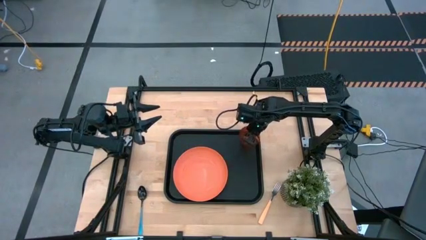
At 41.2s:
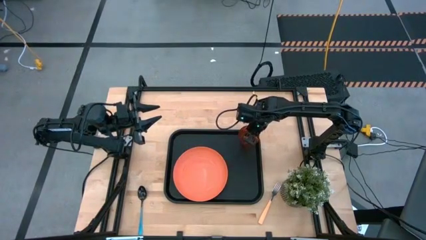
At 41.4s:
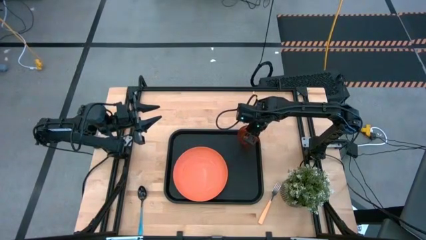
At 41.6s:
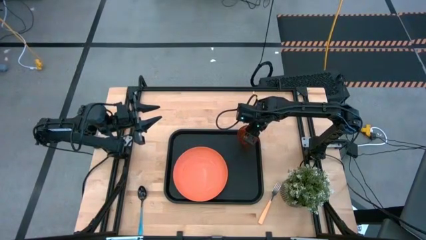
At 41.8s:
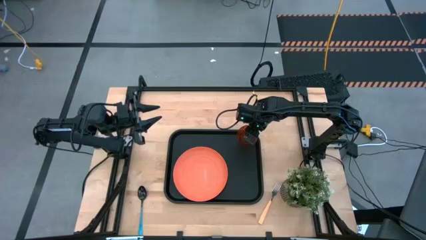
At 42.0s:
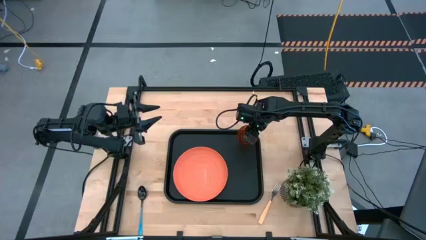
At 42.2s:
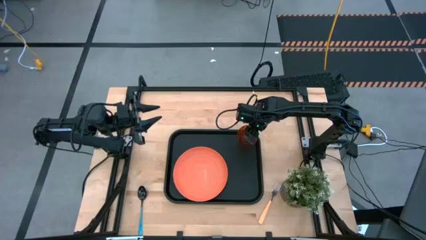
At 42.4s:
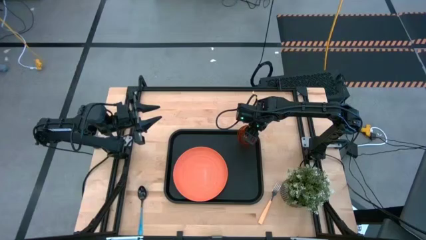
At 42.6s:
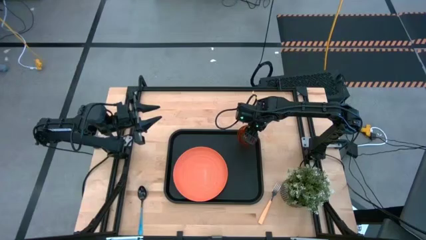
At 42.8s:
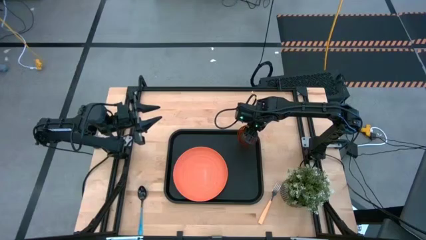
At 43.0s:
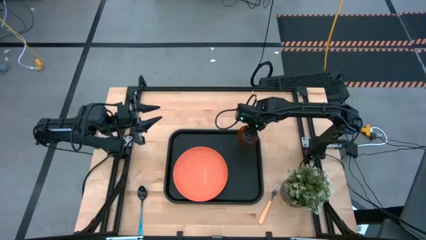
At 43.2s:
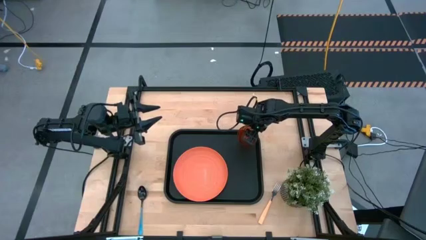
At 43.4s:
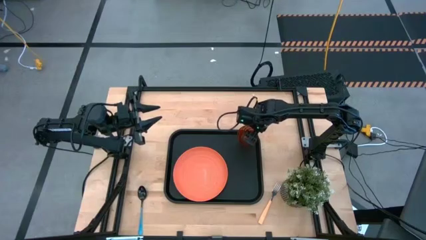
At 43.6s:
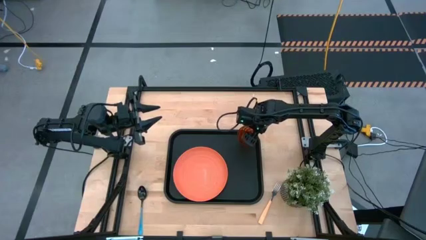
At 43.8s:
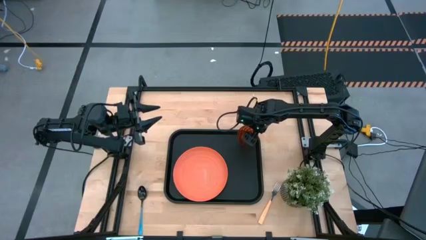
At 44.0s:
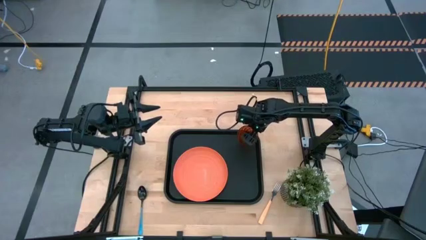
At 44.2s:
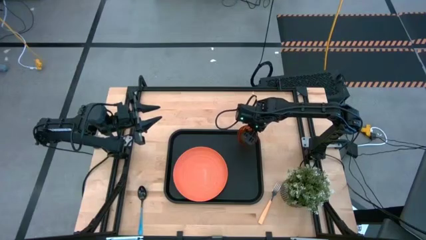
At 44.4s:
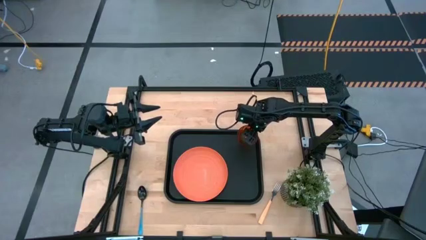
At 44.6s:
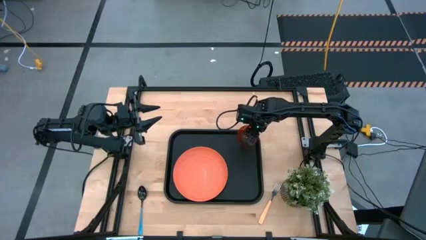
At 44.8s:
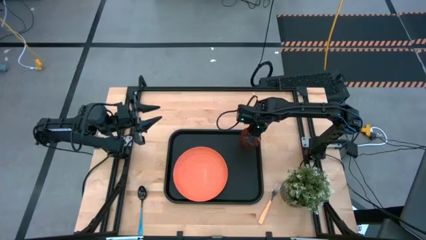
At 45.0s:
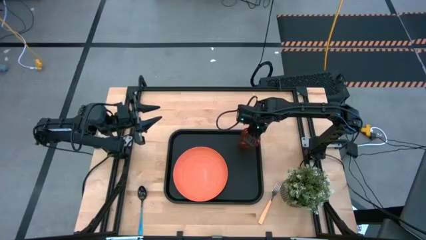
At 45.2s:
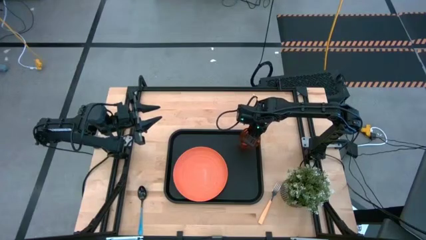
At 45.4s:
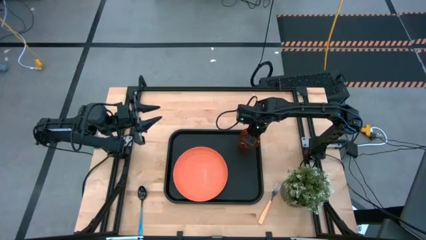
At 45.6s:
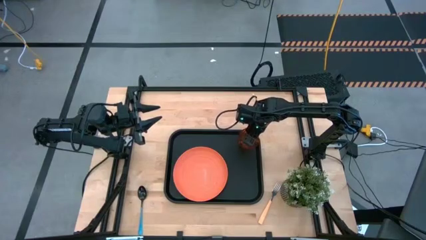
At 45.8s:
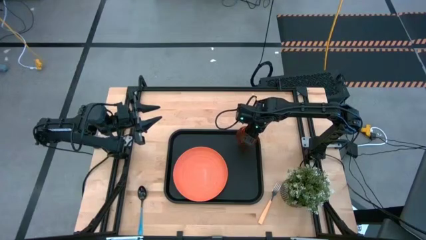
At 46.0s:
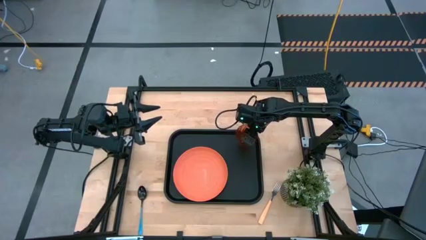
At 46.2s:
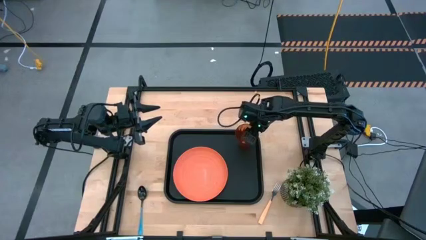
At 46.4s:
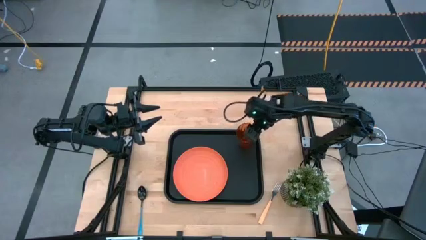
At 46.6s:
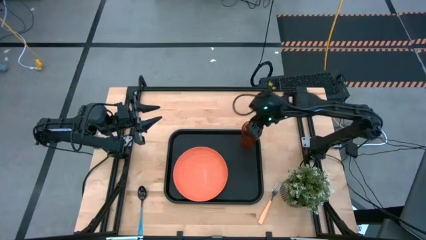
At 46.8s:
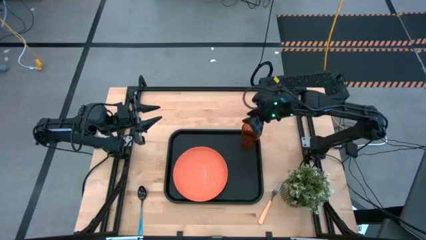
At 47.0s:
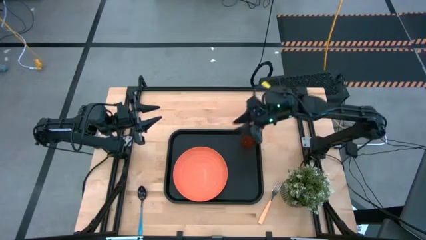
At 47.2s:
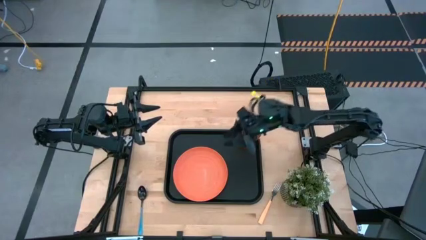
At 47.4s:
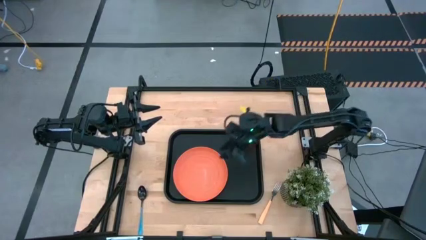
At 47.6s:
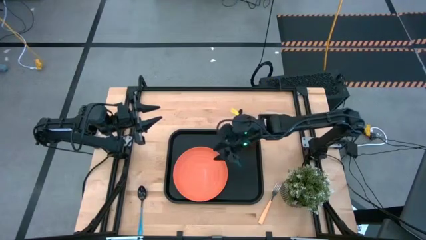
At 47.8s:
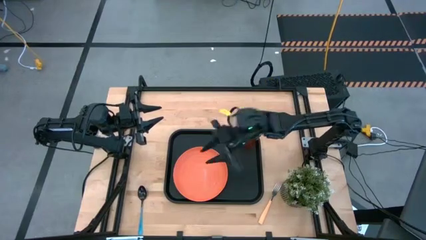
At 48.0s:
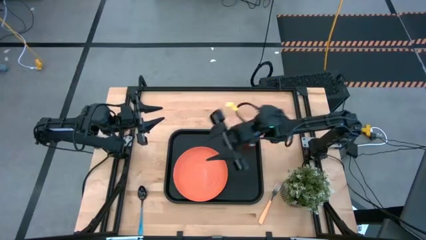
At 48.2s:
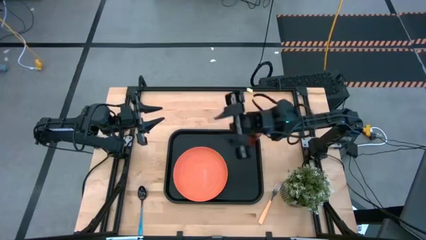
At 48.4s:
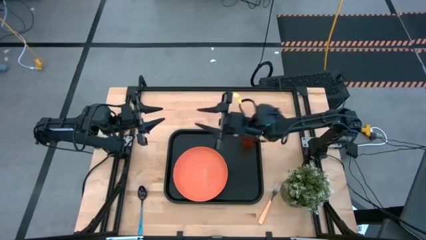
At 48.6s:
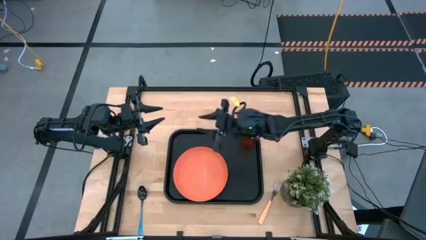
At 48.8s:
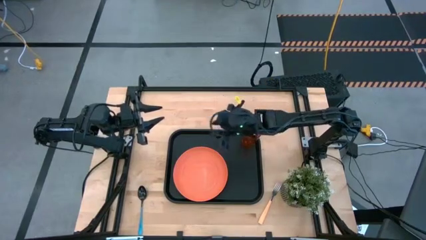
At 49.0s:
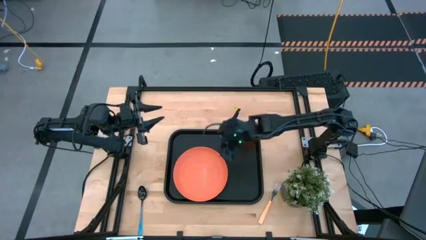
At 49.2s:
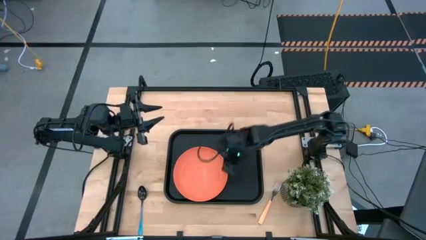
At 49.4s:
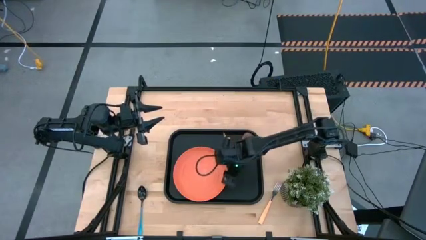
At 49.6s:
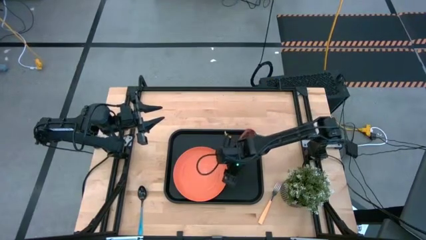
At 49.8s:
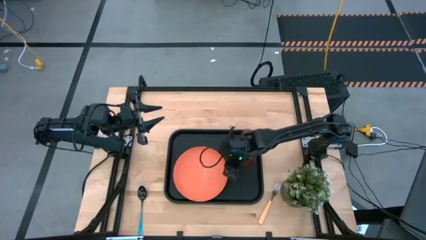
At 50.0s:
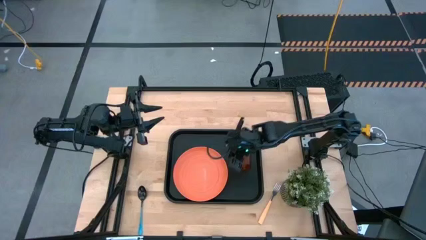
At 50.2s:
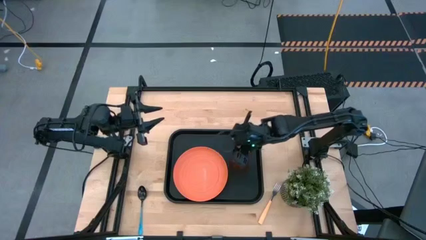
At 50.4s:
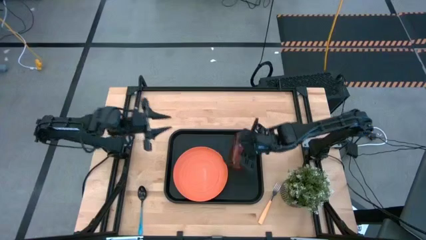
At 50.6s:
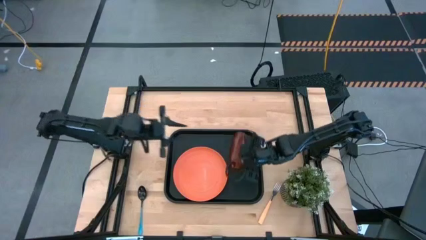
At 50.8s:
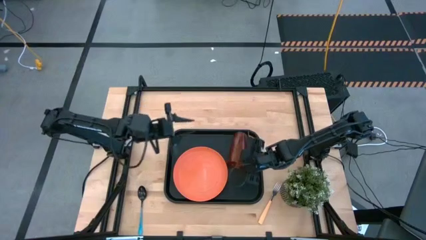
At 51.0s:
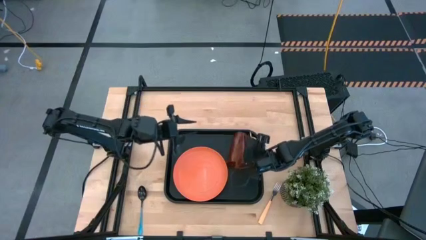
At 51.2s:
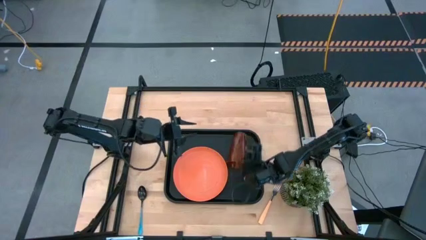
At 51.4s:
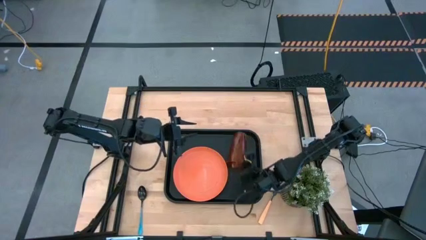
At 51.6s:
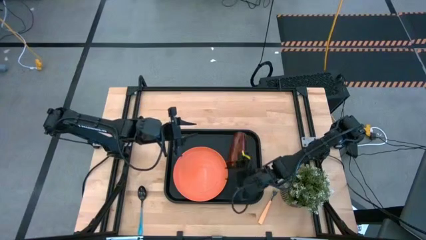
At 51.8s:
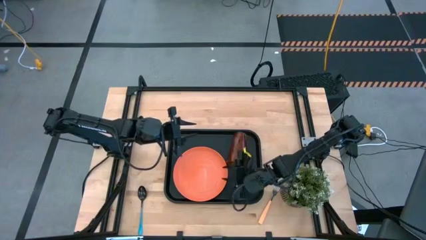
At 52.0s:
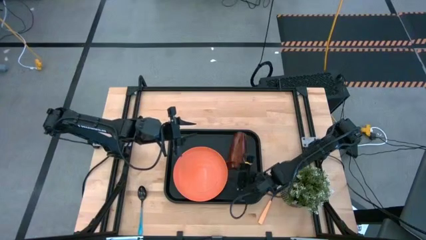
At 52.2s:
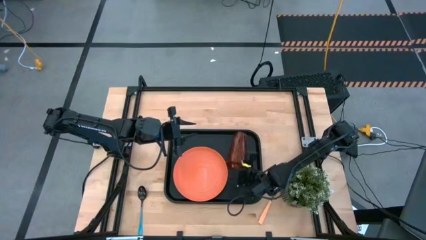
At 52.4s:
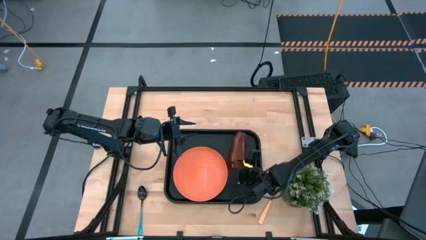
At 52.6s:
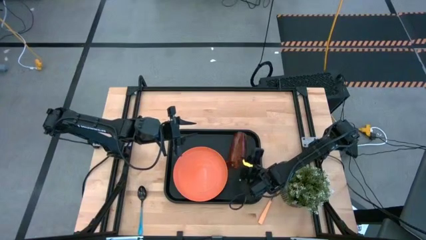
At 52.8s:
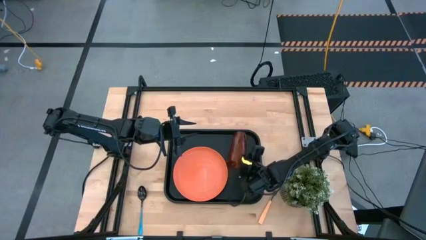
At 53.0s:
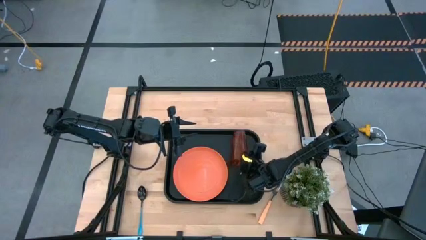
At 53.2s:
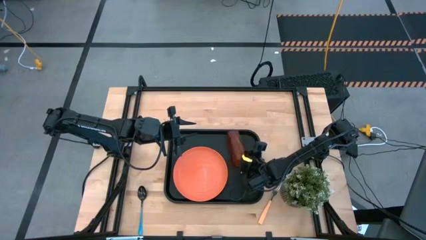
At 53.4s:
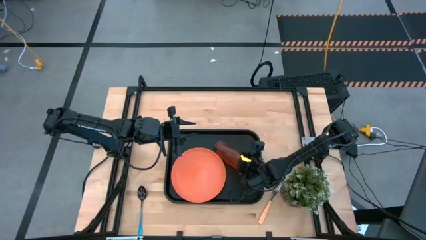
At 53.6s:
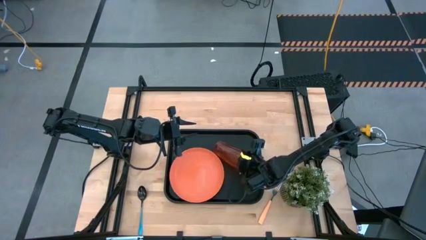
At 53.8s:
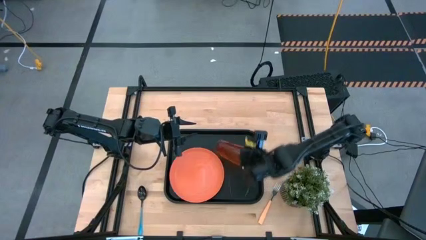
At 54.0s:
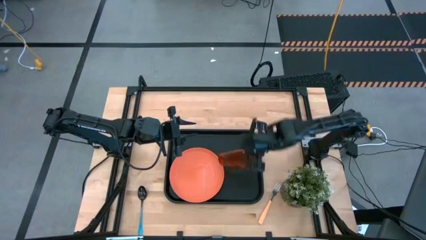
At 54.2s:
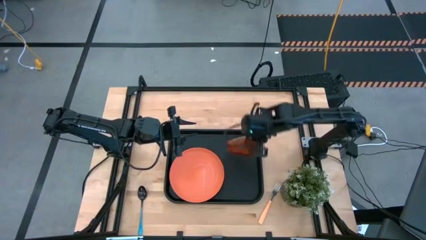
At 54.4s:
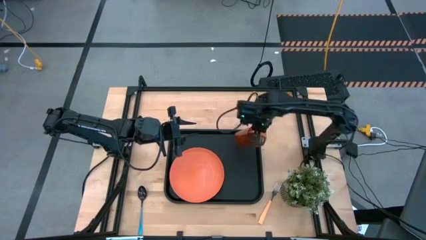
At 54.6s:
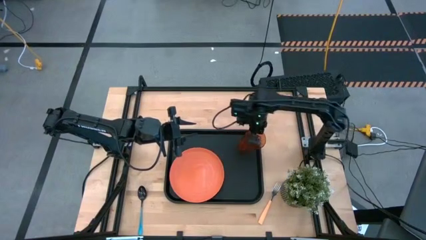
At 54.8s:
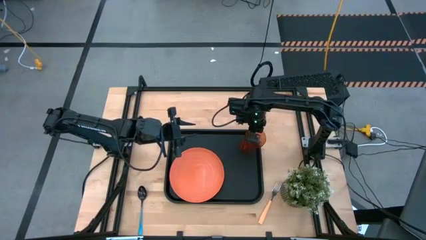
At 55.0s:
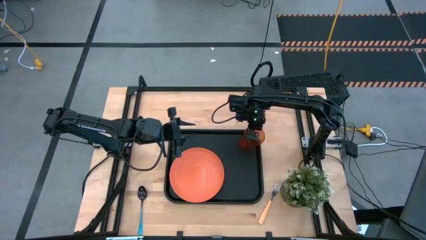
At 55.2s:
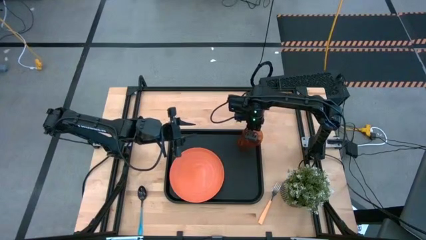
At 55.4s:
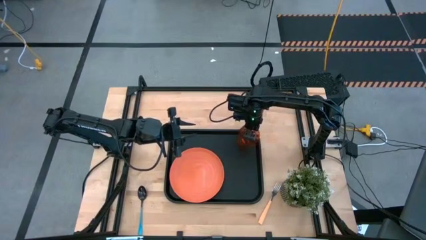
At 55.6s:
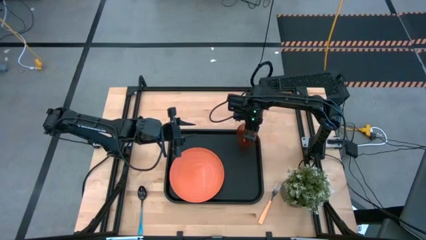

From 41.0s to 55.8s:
Task: Pick and place plate/cup/fork/spoon on tray
Put the orange glass on the black serving tray
